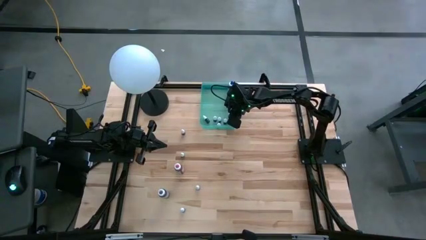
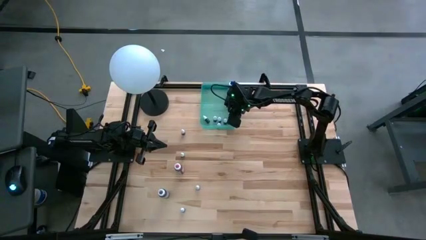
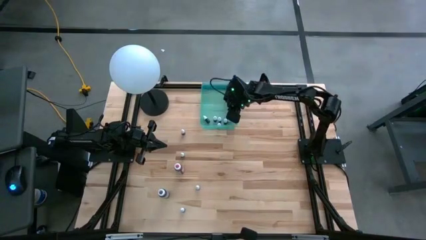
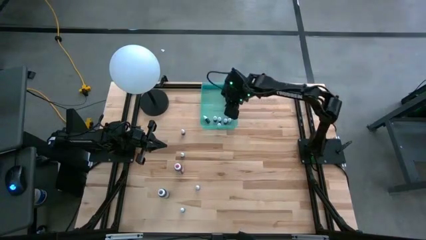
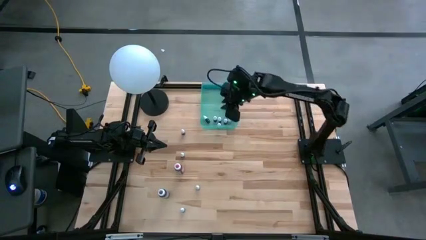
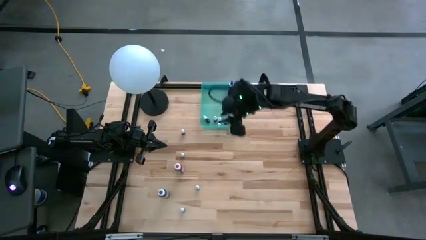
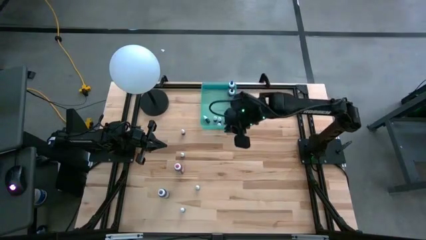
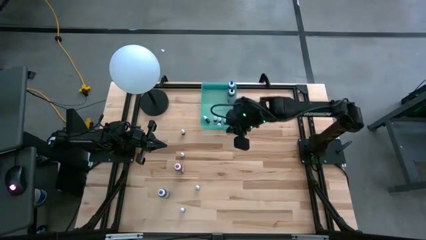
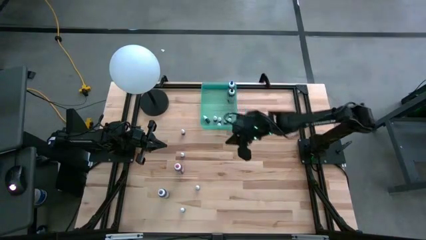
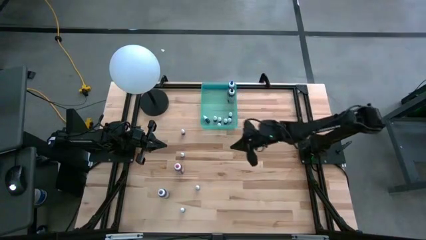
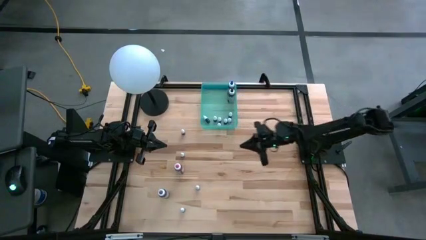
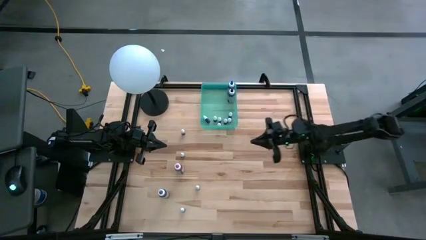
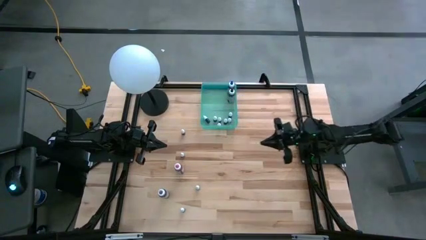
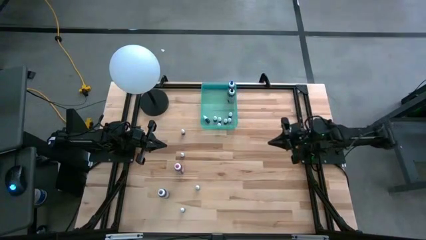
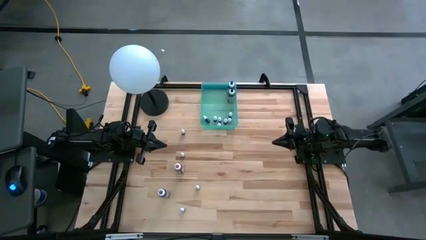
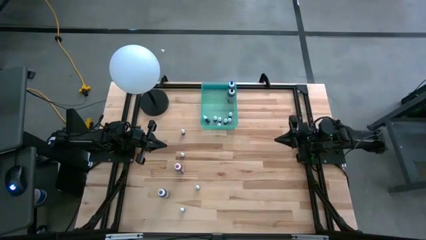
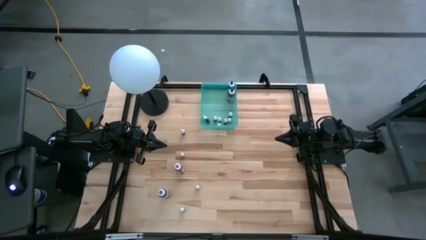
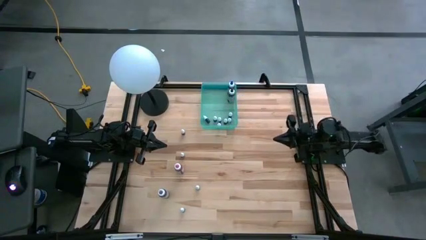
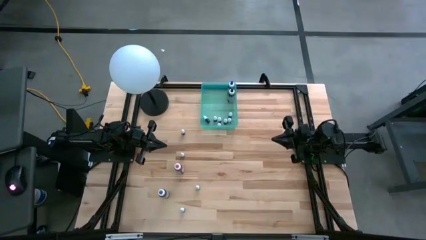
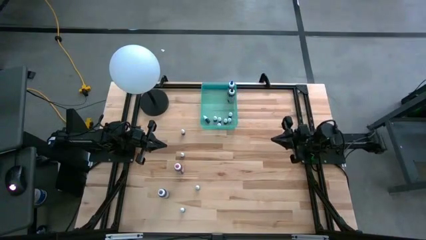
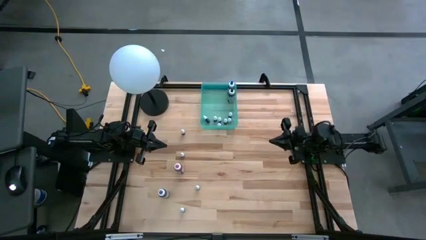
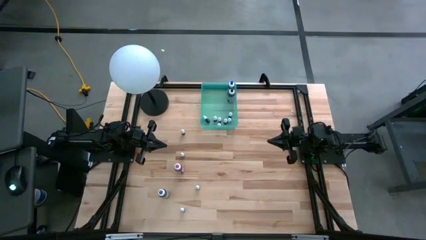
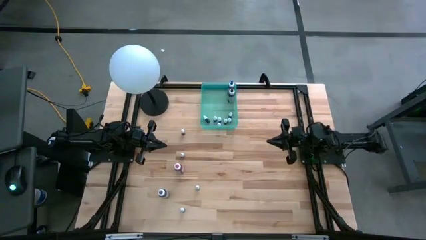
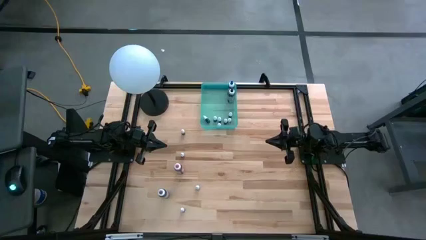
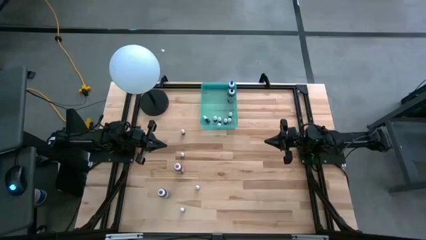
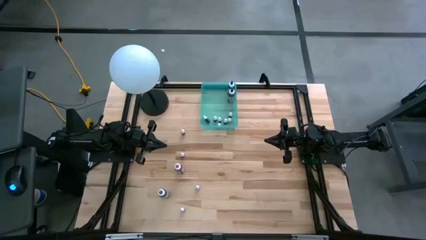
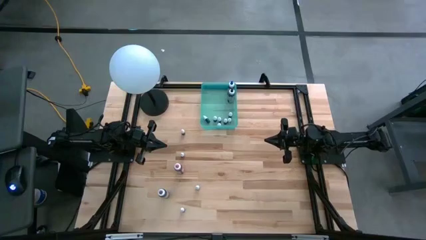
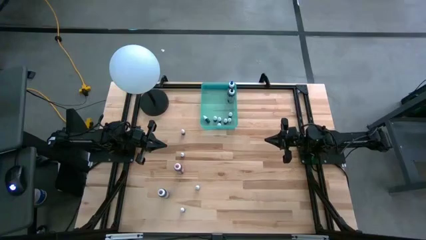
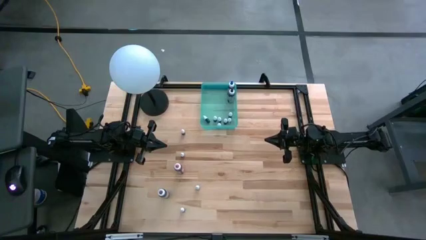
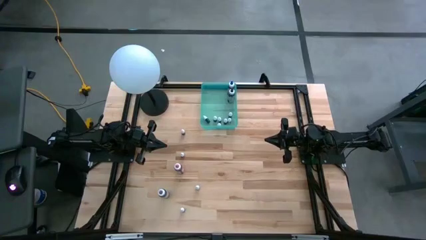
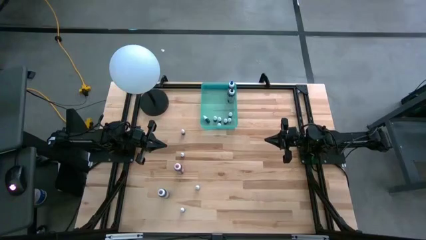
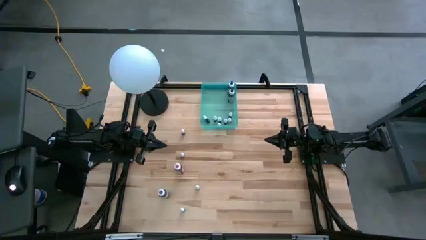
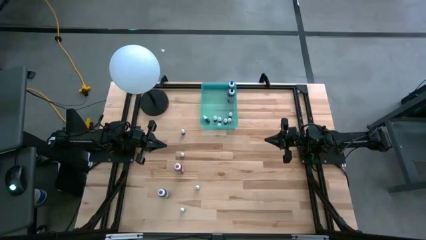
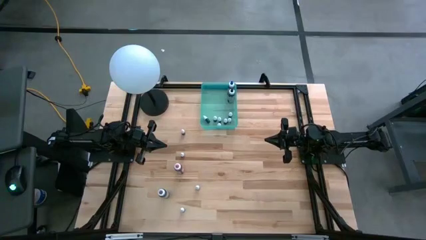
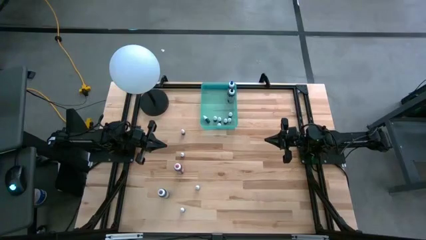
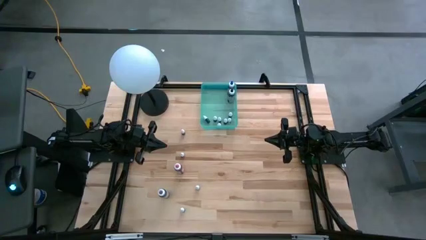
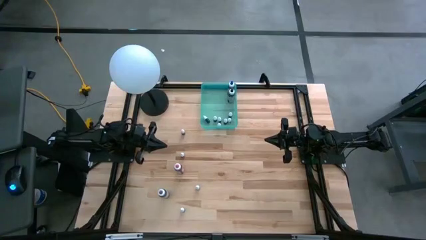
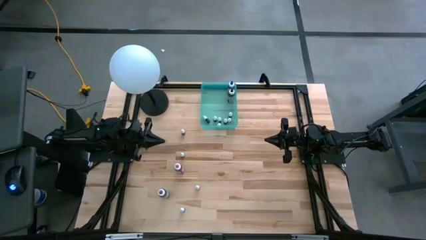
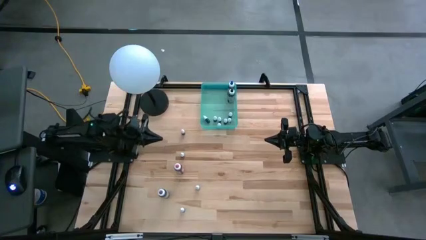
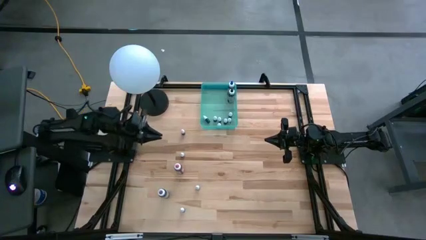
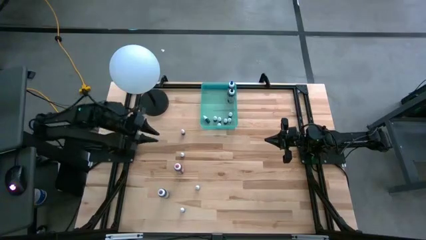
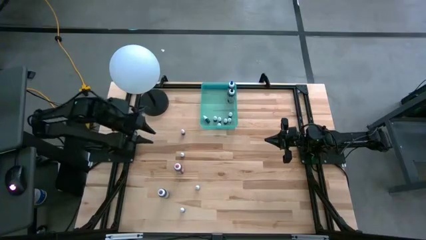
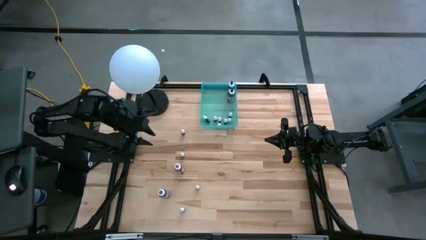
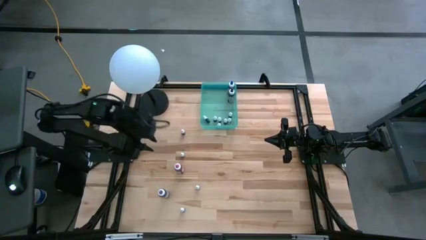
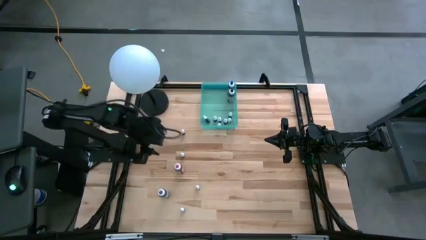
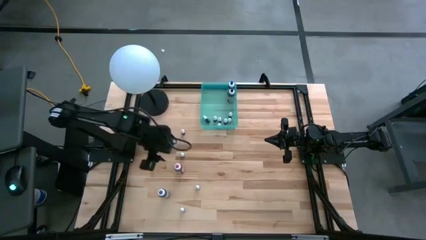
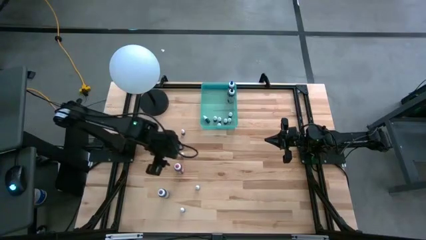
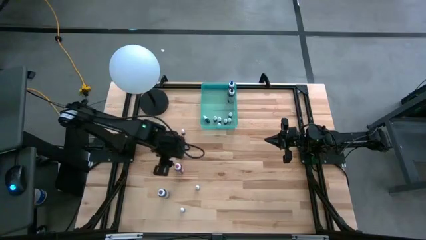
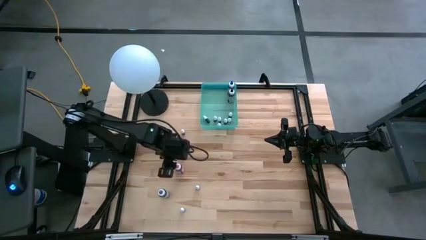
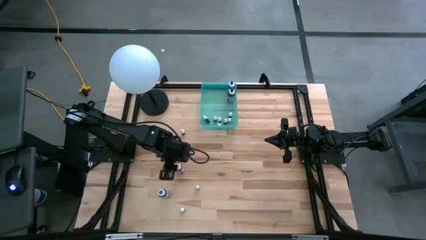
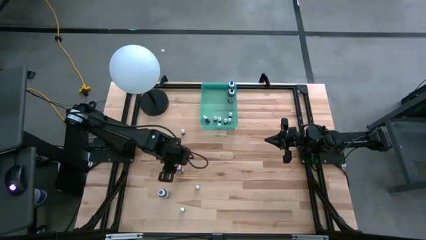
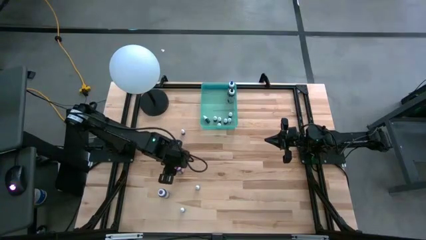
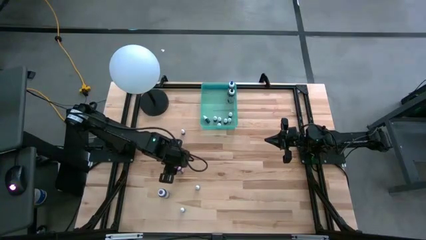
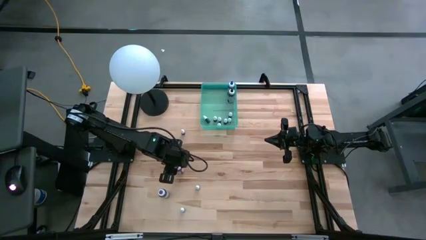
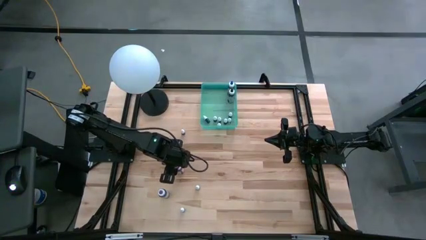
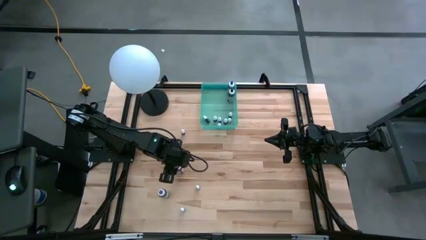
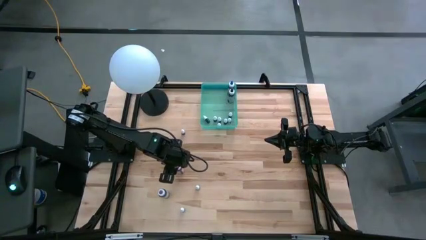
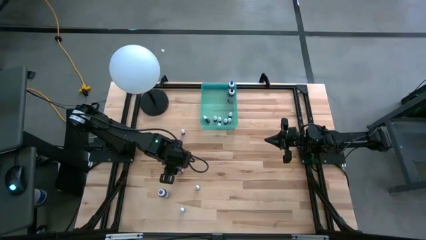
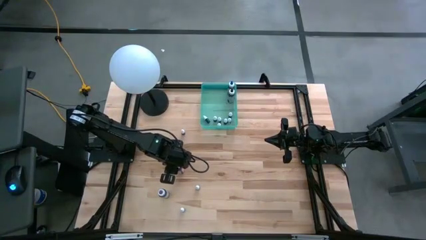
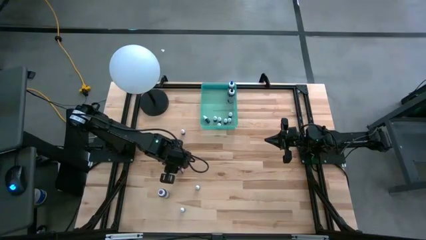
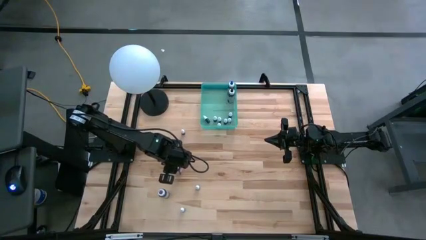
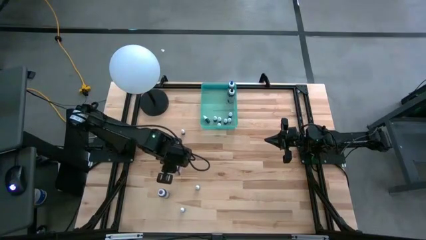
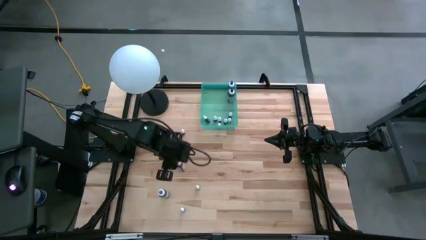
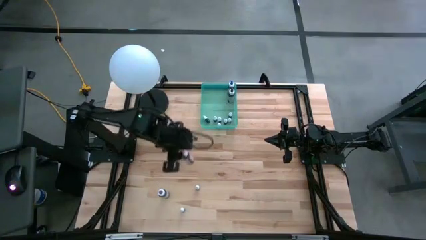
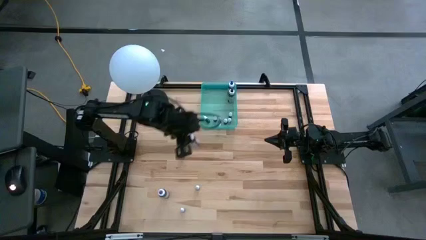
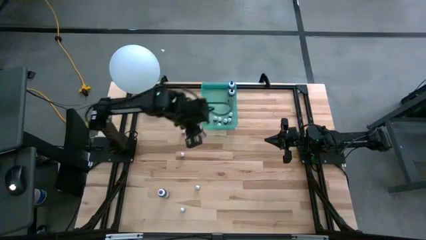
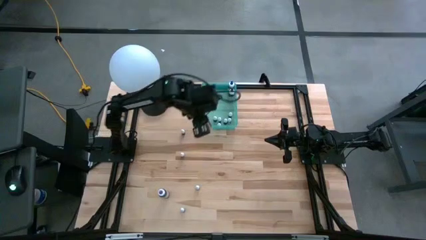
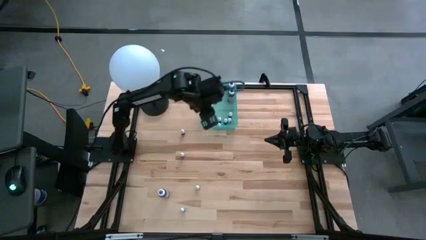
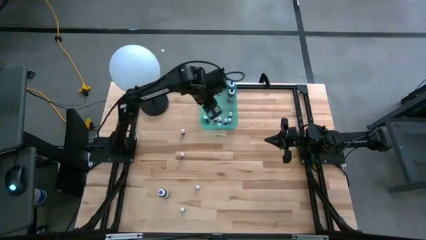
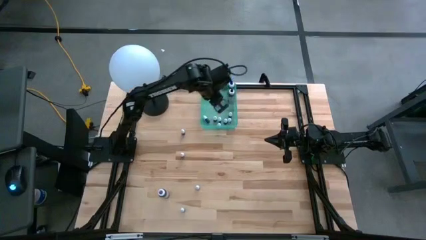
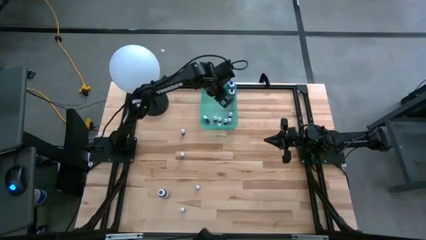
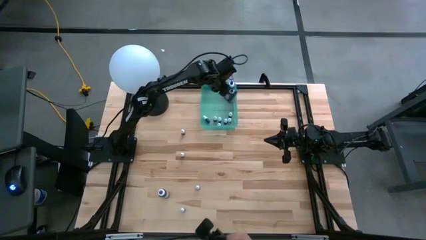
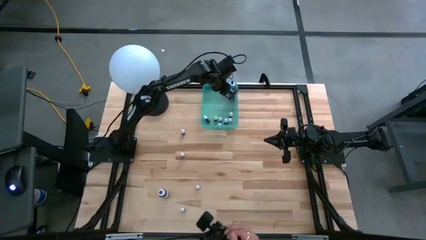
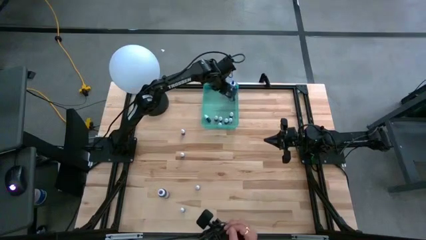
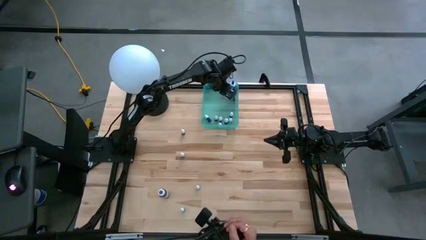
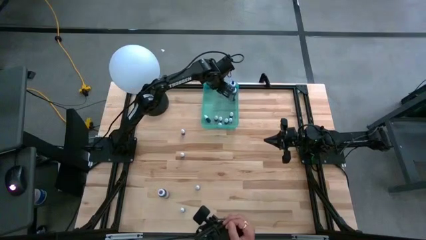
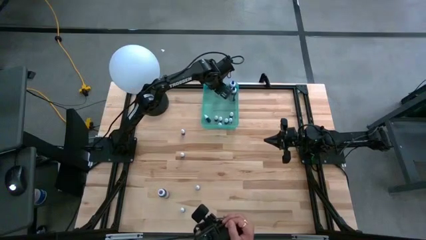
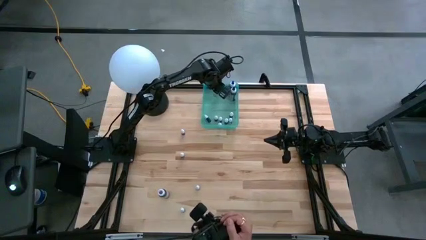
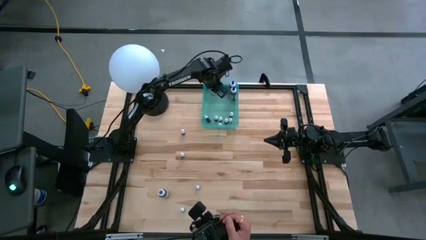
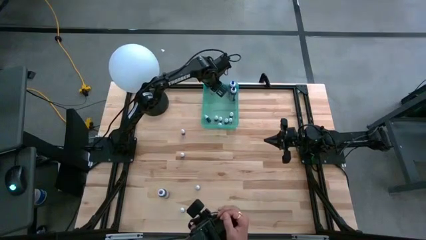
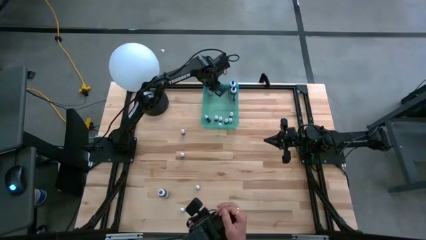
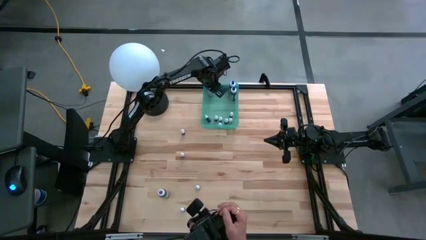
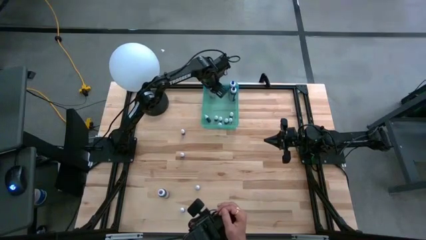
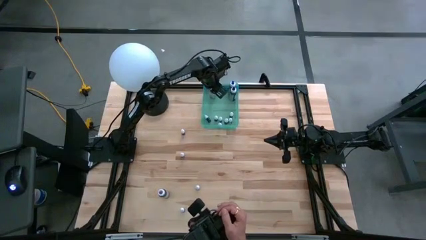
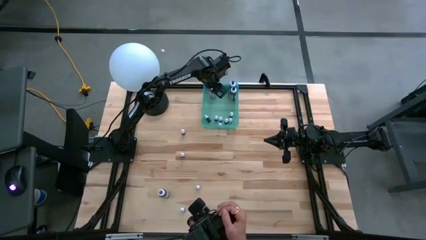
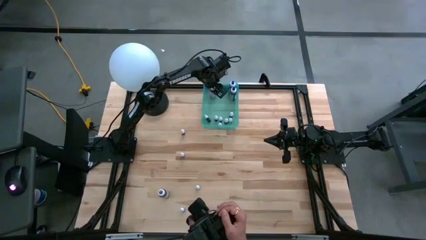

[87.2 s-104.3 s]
Task: Pick & Place food coloring
Put the pink food coloring bottle into the light blue bin
